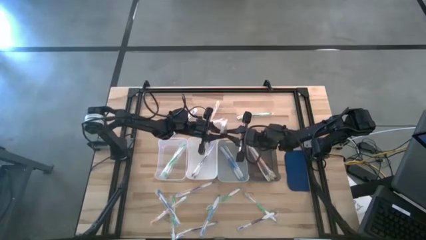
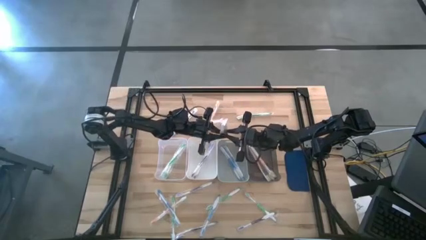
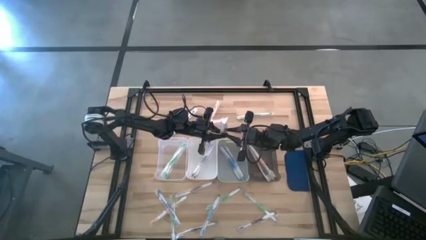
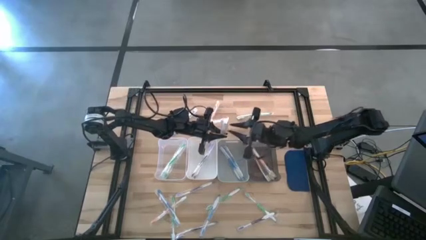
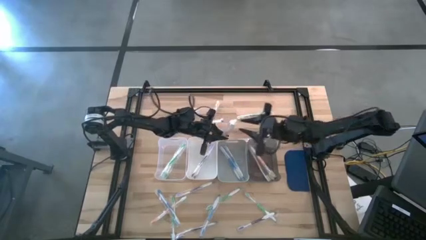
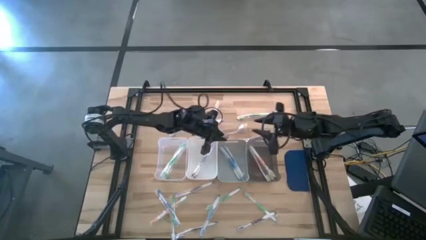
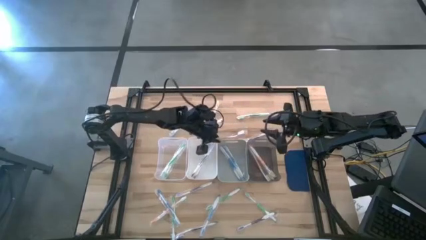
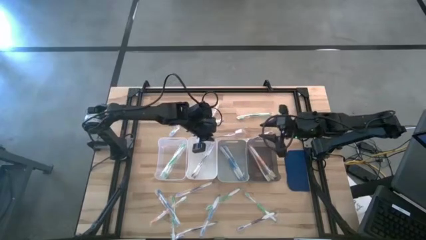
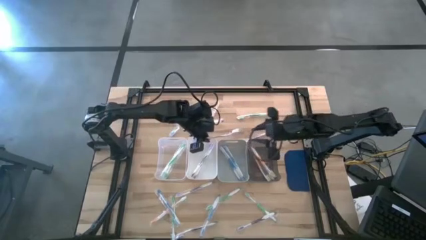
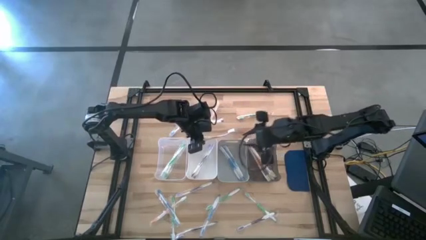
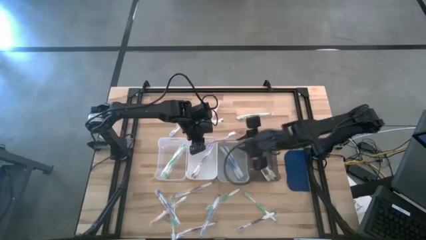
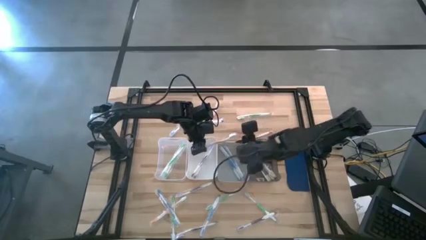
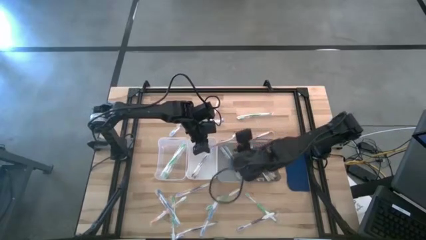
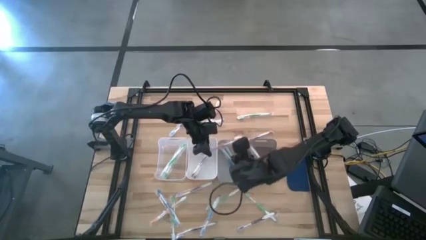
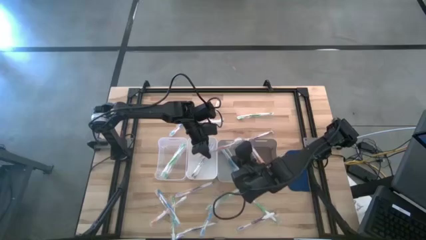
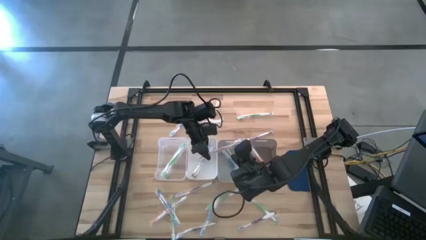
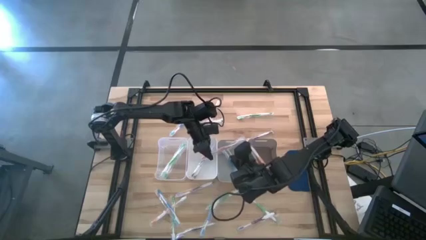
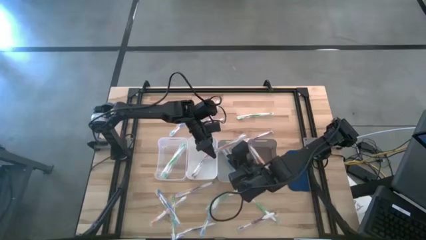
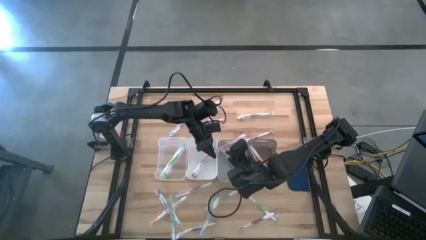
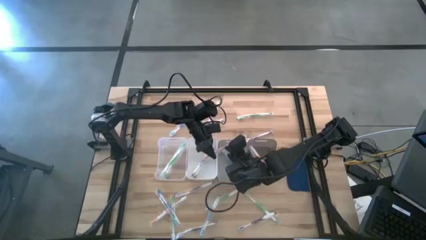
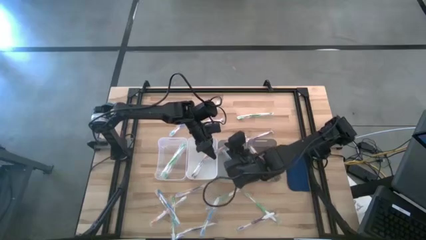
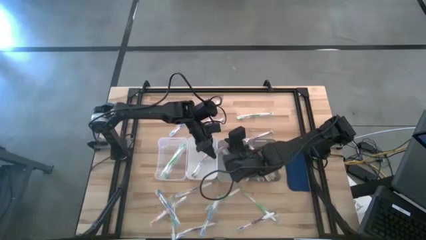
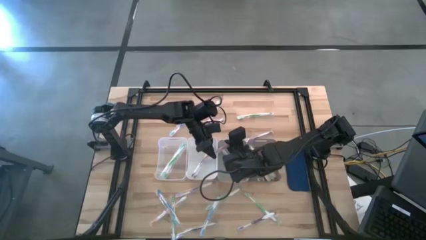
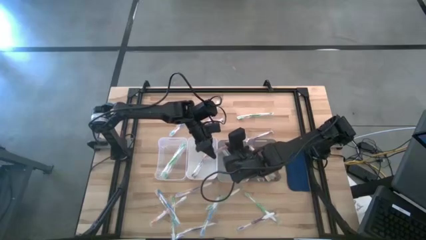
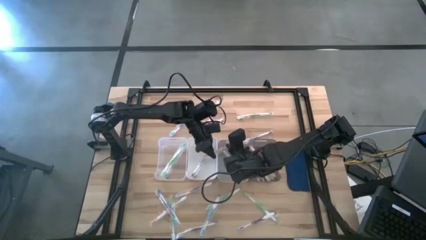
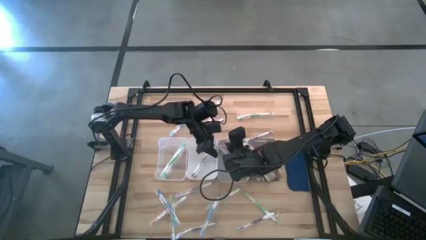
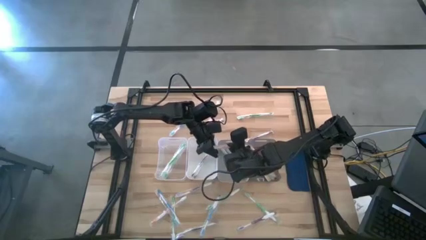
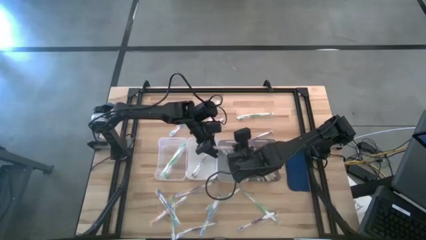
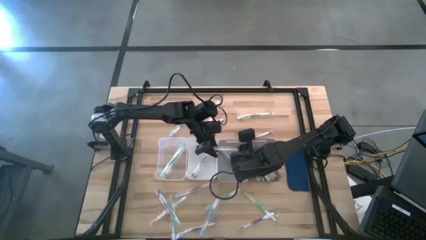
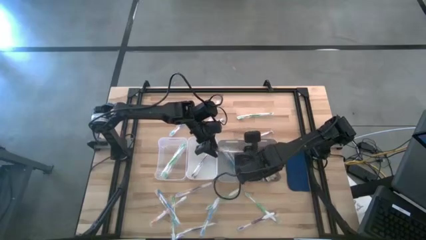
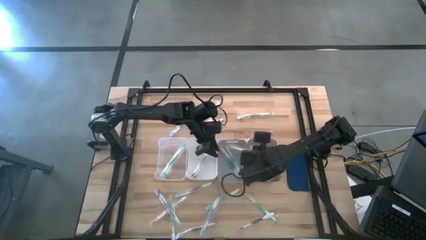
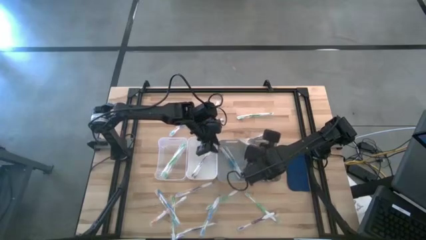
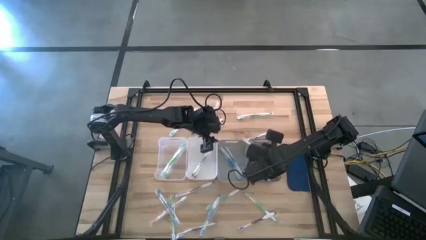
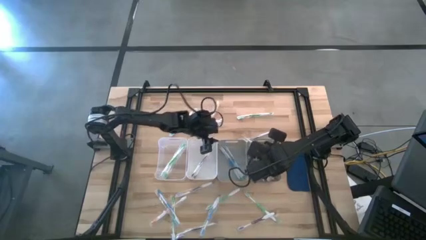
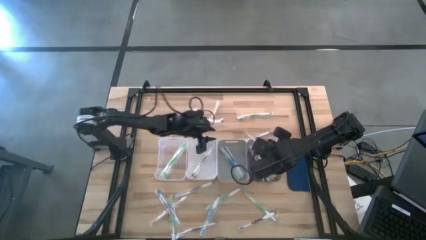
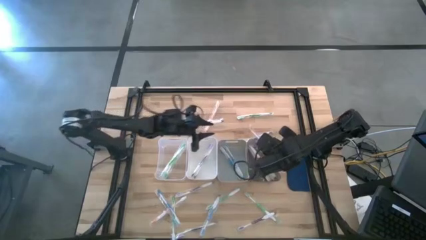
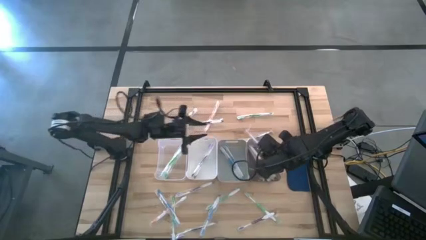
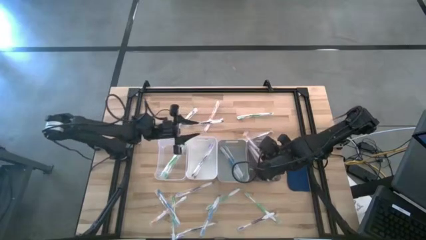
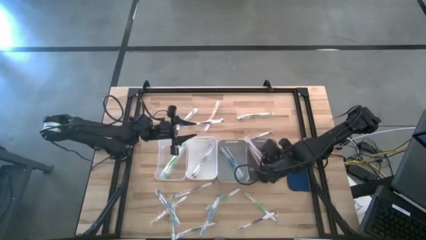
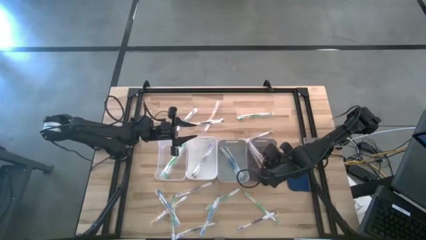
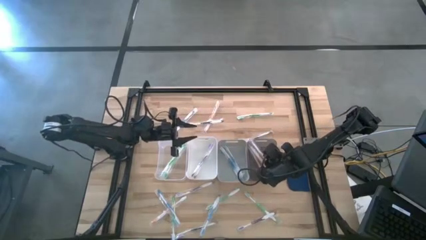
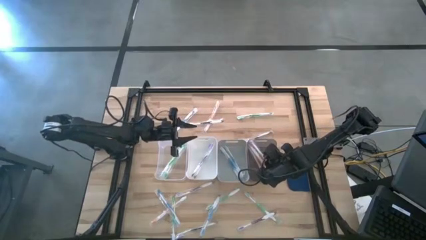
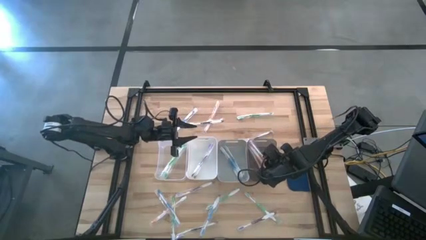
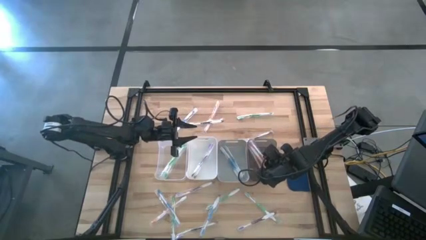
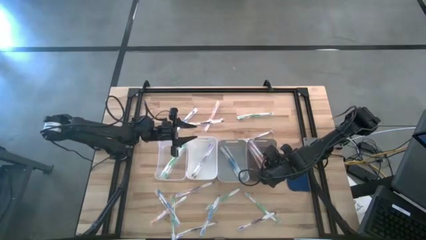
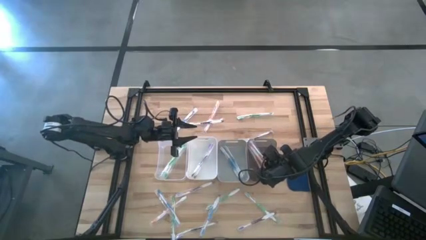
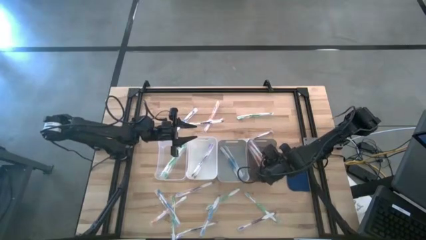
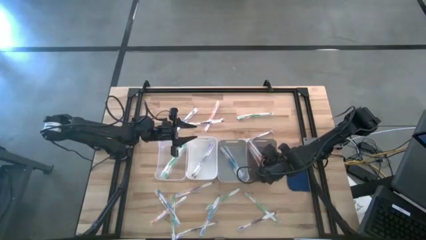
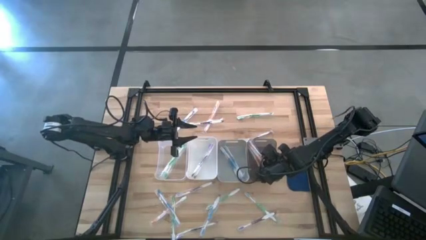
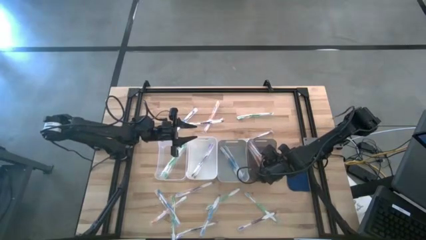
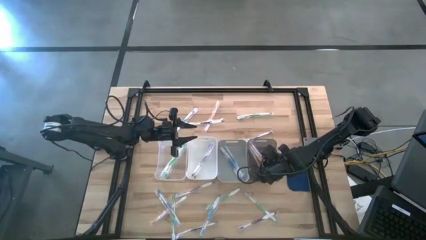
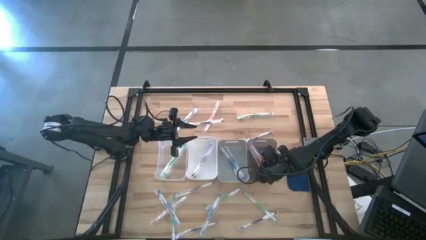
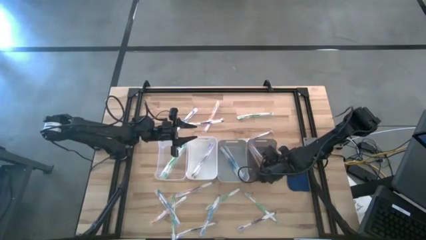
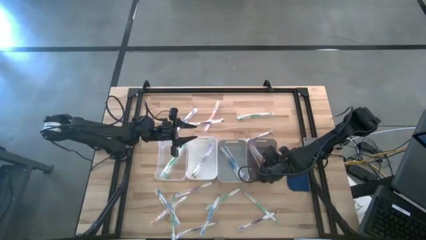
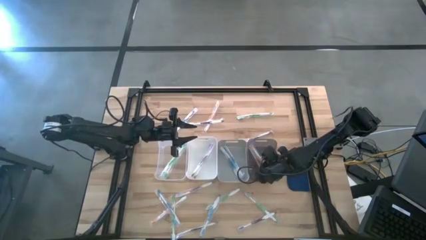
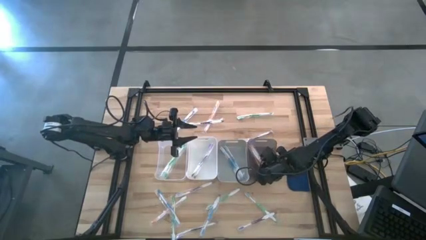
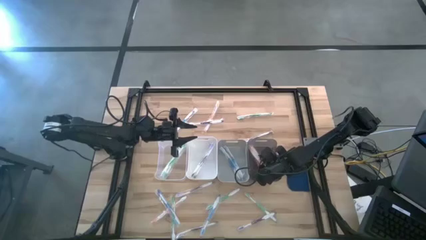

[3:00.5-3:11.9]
Task: Pick & Place Toothbrushes
Put the orange toothbrush into the black bin
